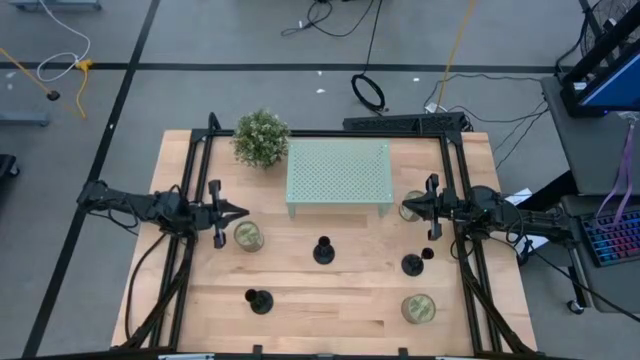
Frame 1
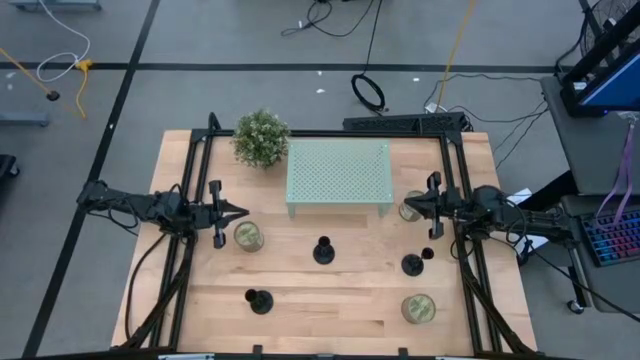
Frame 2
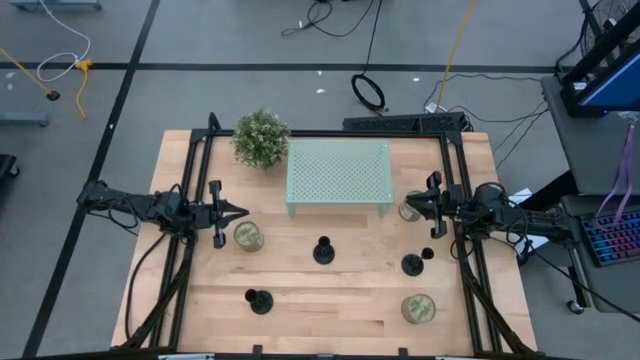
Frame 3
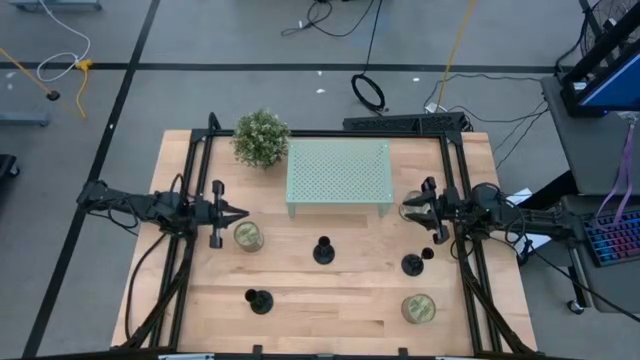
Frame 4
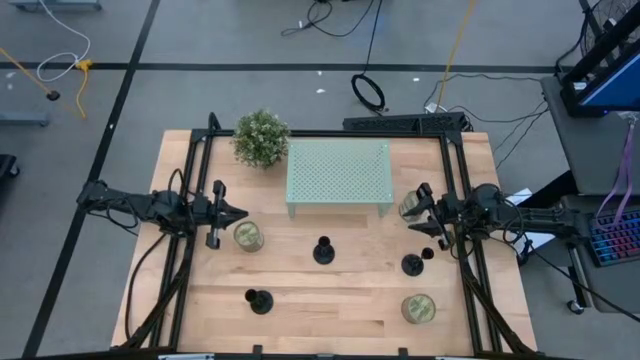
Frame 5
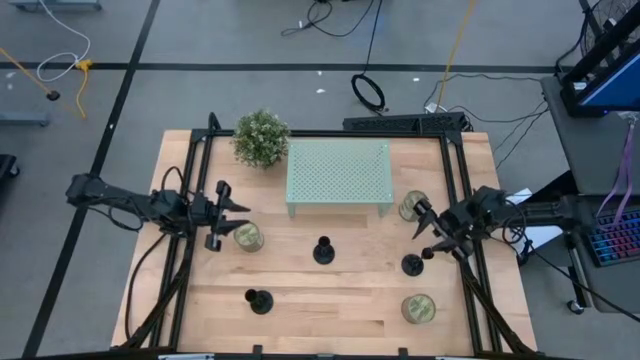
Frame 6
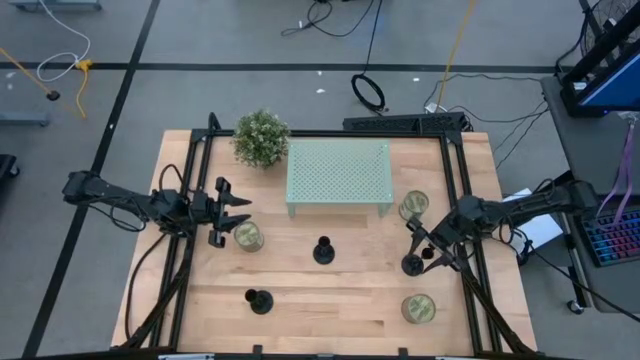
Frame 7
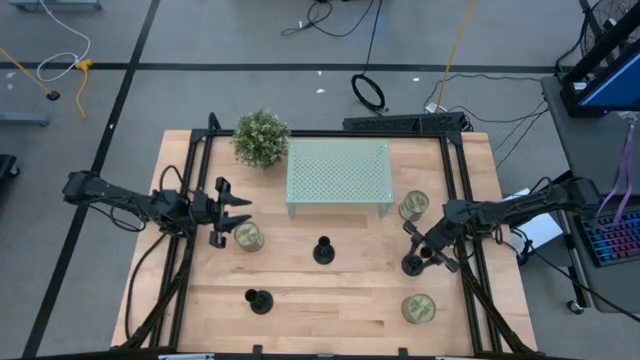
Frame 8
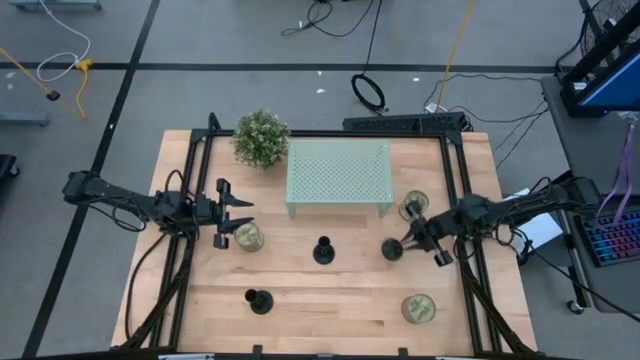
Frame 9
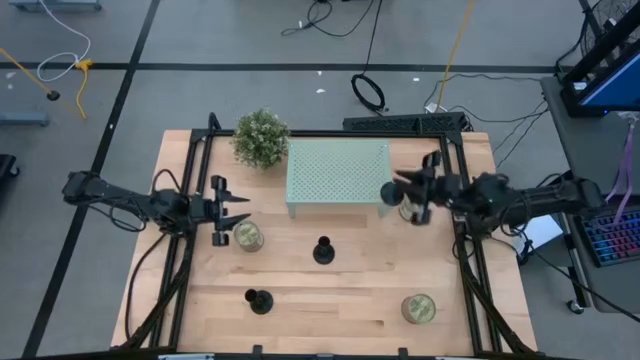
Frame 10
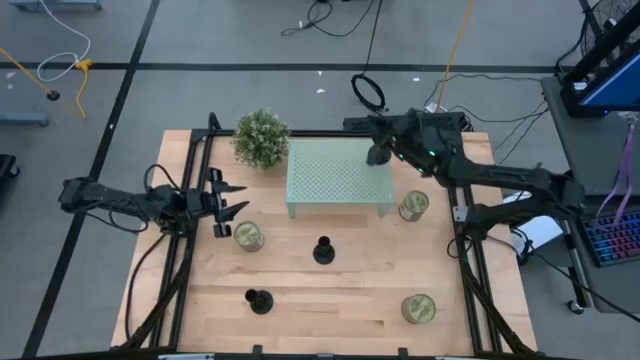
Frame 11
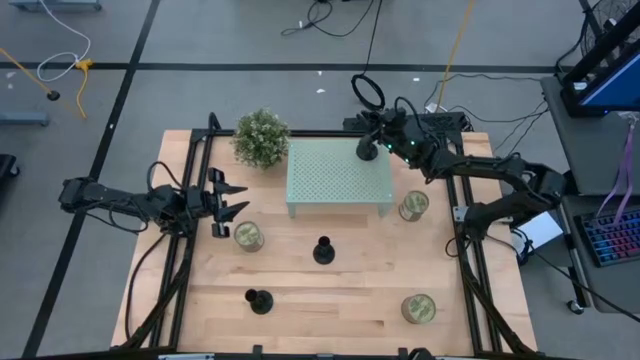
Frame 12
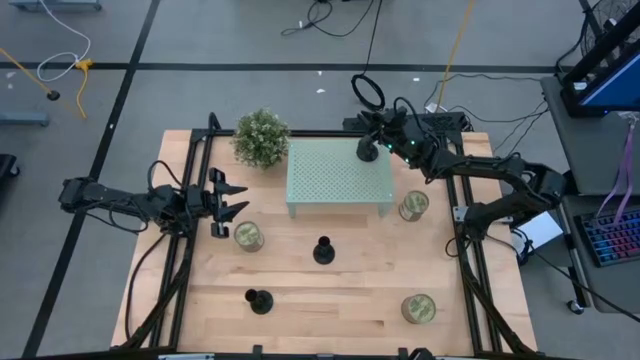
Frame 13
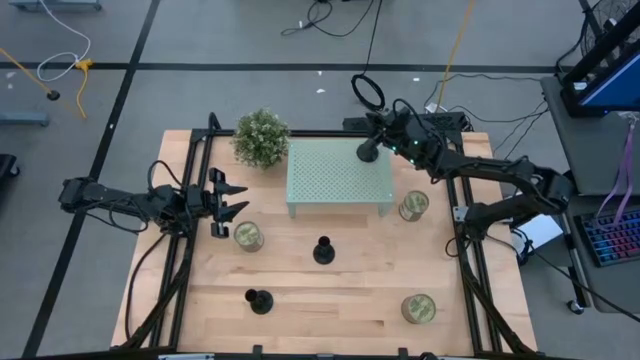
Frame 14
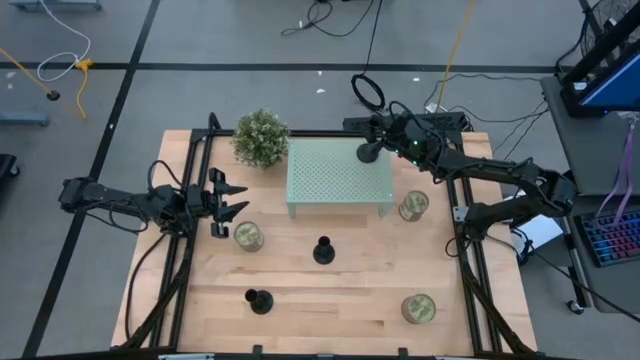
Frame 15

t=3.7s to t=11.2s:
Task: Pick & Place candle stick holders
Put the top right black candle holder on the shelf

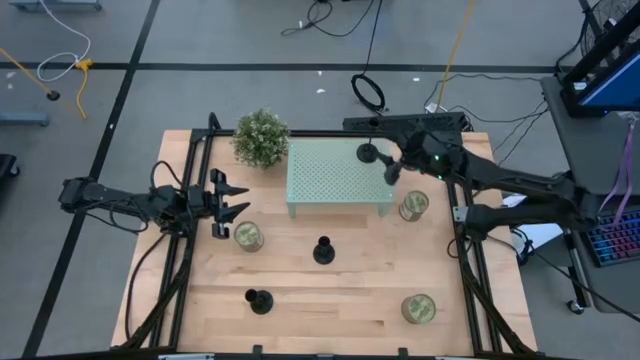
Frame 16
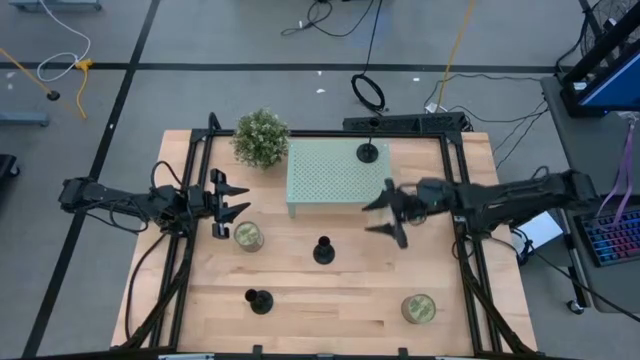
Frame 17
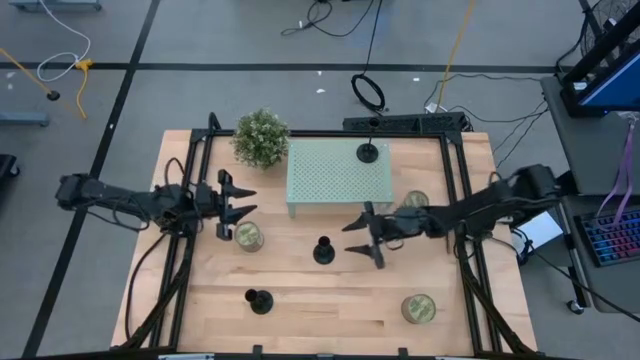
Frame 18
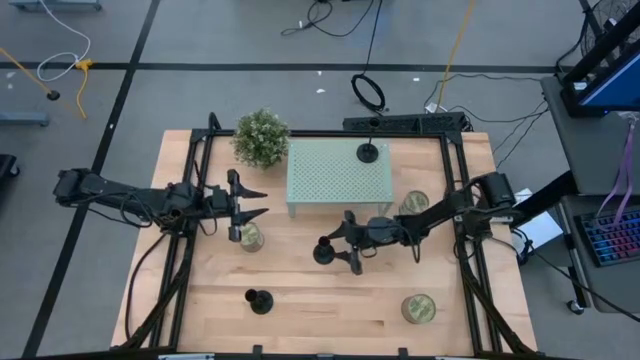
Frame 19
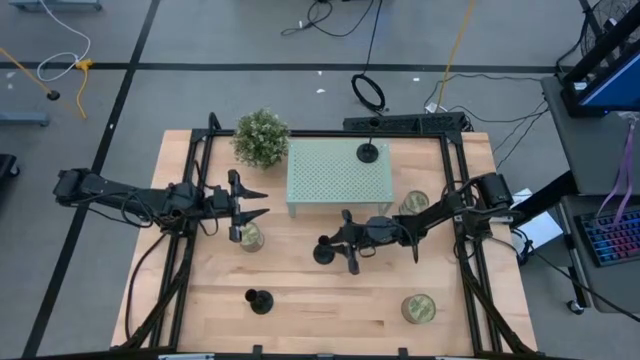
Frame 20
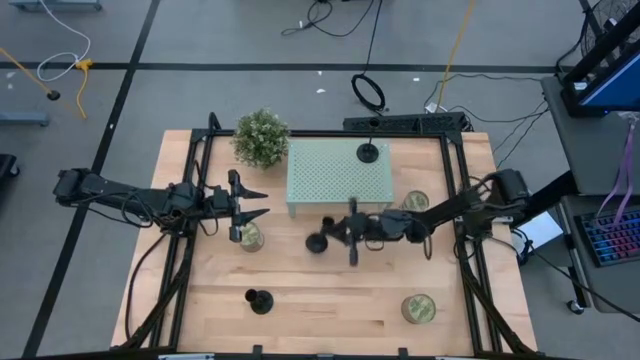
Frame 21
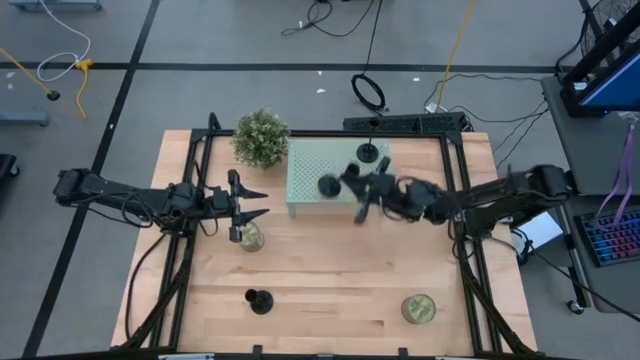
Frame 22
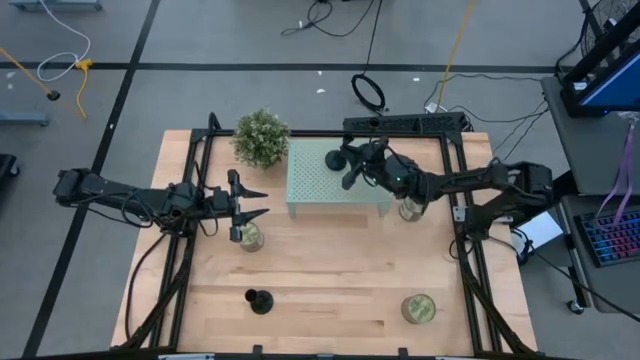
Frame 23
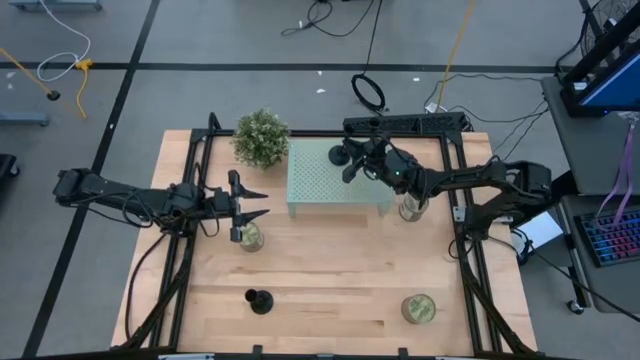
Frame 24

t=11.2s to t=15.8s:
Put the top black candle holder on the shelf

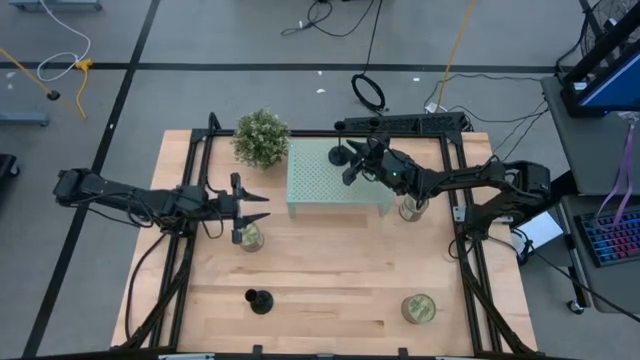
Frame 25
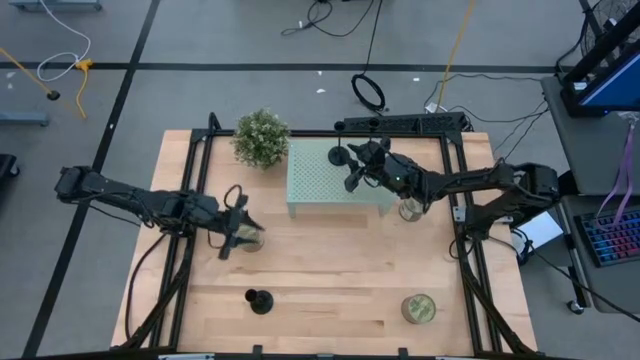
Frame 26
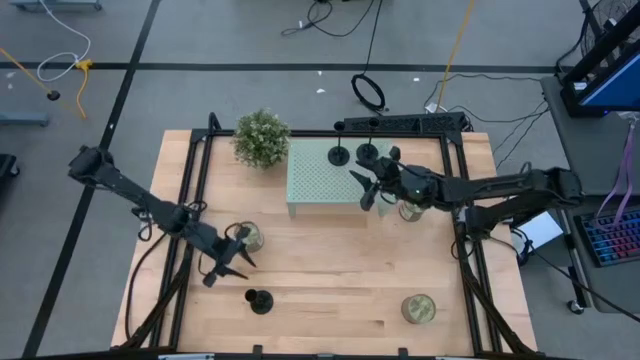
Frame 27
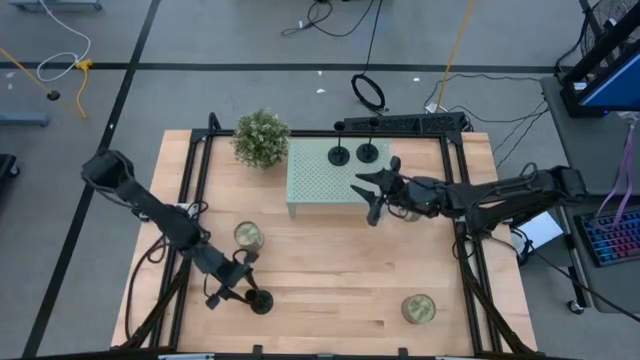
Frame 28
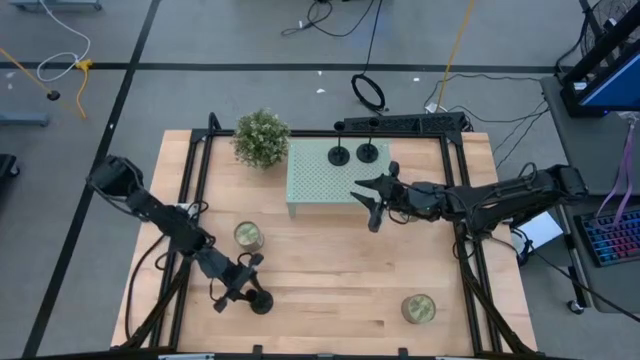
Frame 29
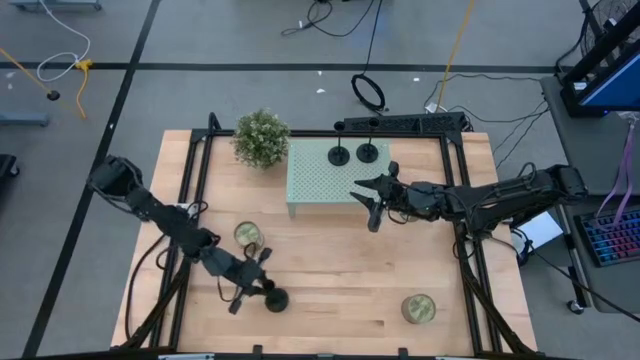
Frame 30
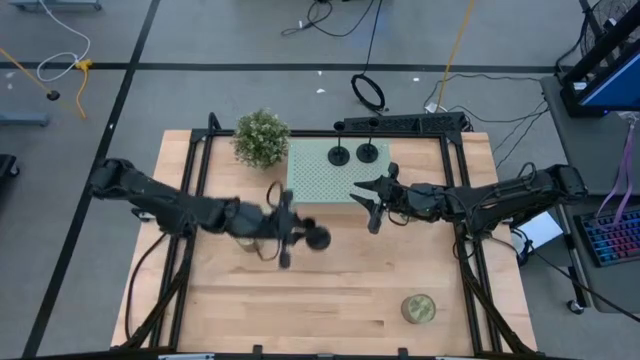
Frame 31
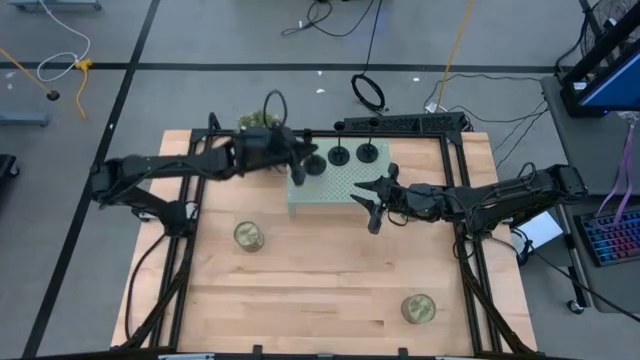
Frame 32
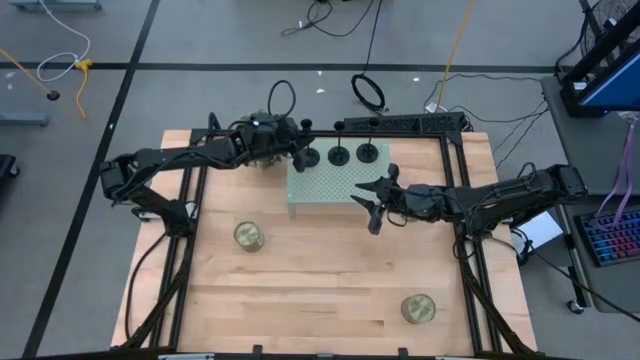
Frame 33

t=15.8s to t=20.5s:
Put the black candle holder on the shelf

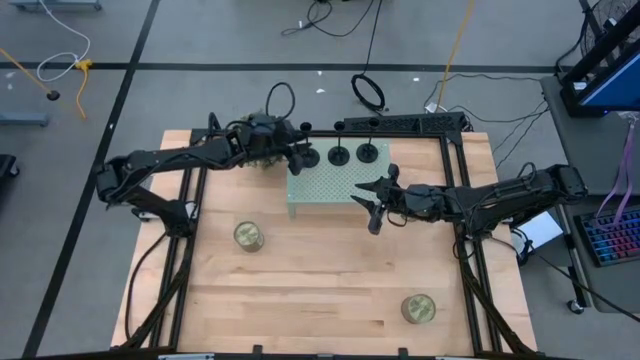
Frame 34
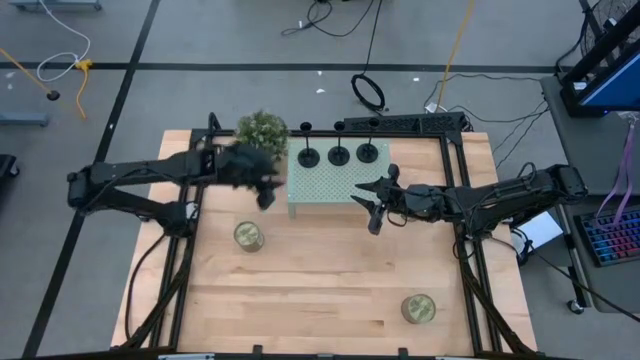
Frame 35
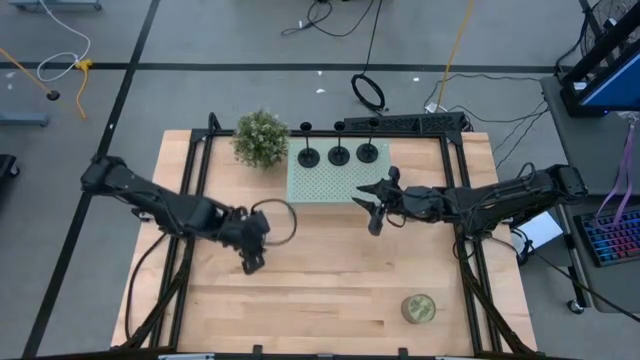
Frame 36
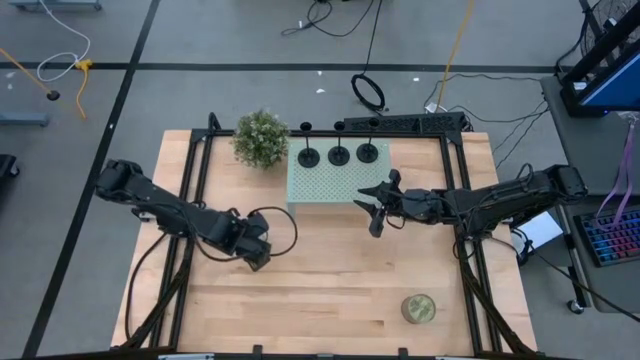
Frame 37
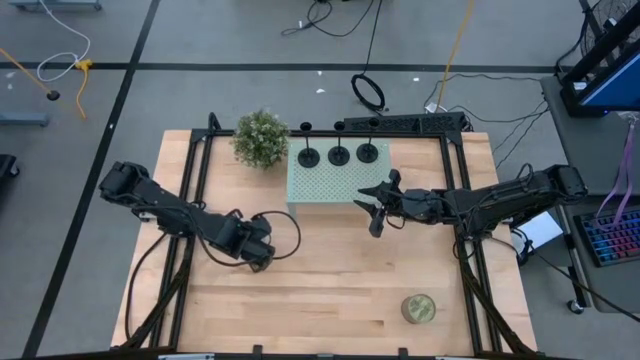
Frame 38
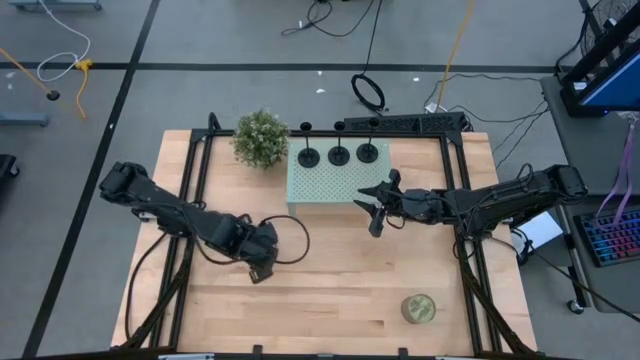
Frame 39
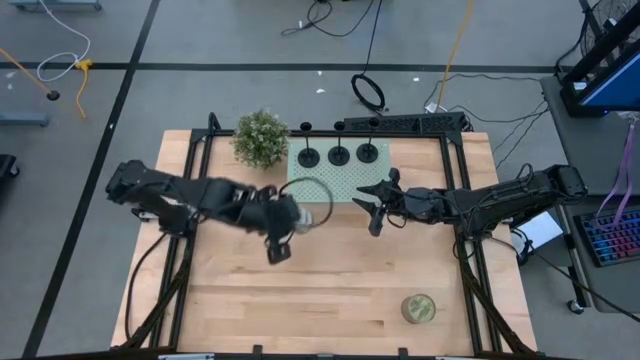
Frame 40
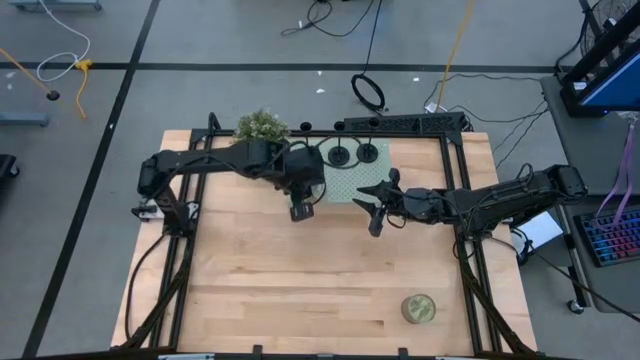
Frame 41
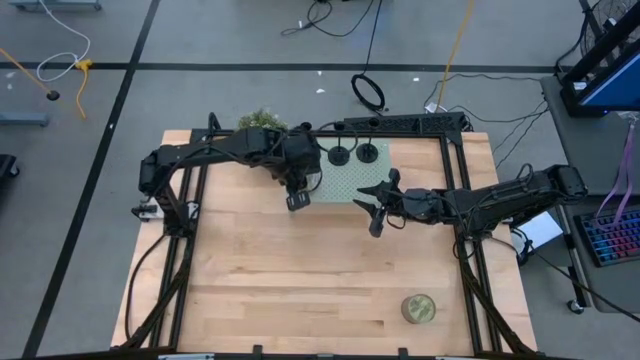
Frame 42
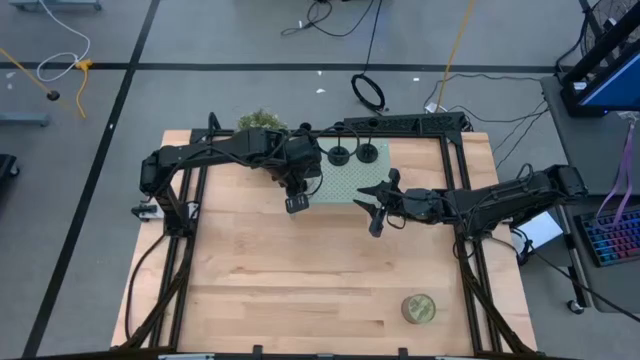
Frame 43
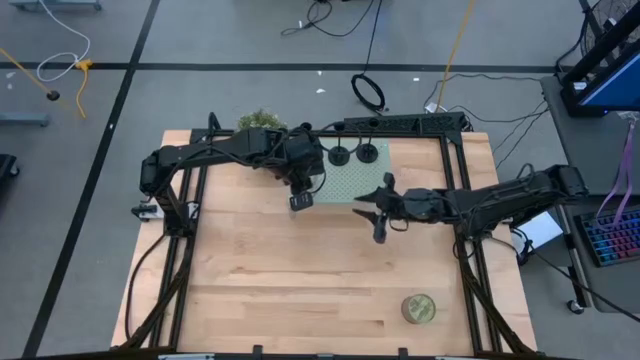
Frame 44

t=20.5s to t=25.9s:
Put the left green scented candle on the shelf
